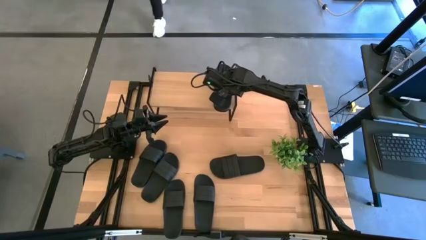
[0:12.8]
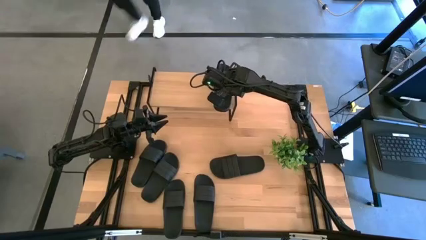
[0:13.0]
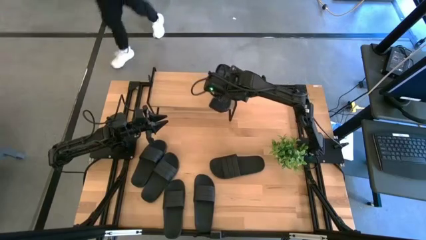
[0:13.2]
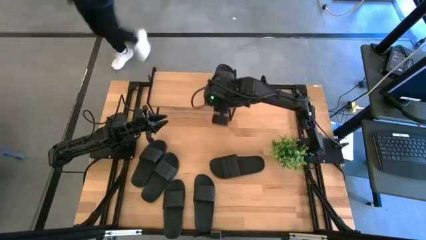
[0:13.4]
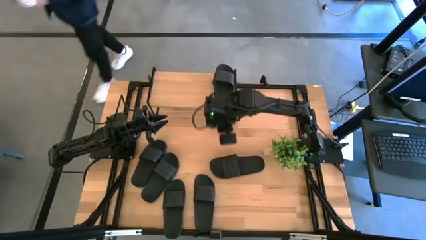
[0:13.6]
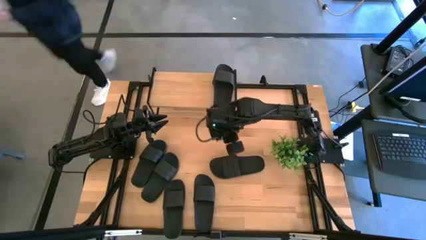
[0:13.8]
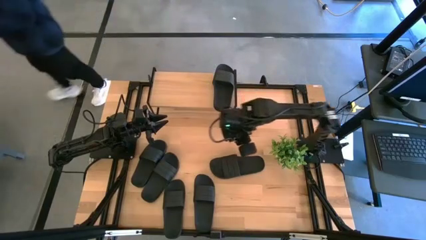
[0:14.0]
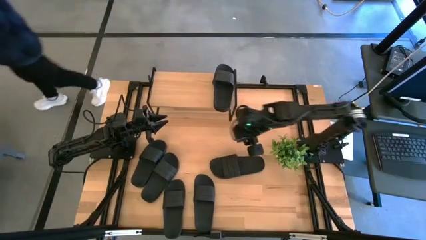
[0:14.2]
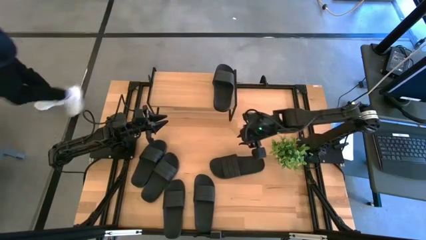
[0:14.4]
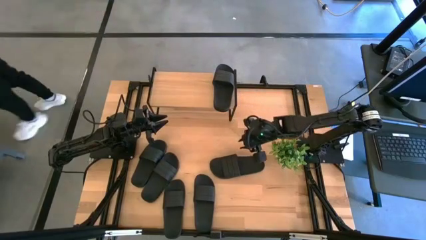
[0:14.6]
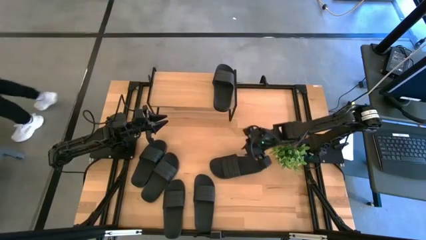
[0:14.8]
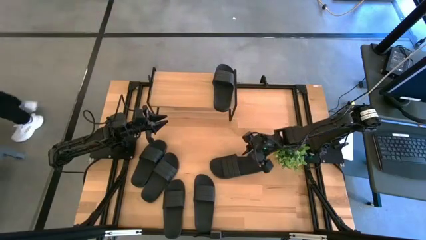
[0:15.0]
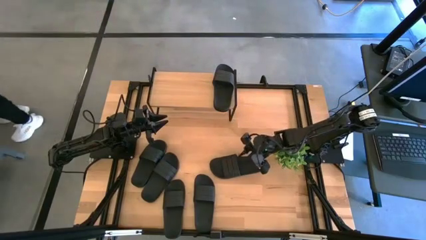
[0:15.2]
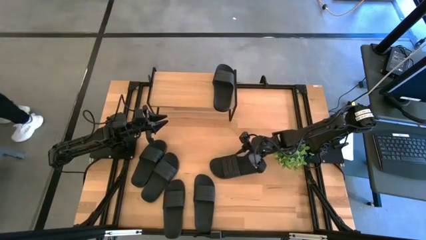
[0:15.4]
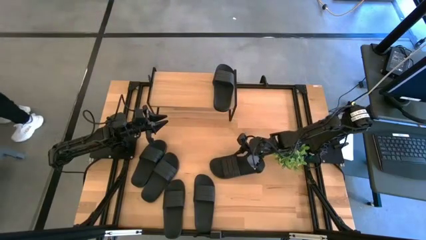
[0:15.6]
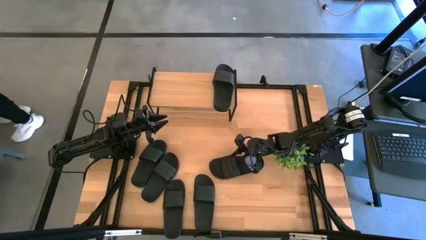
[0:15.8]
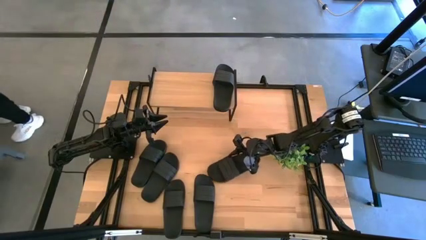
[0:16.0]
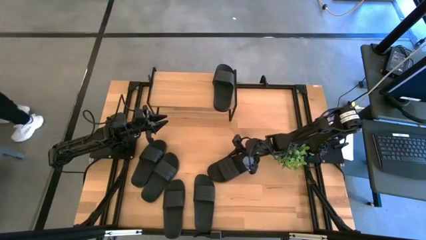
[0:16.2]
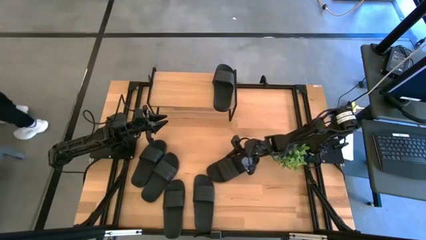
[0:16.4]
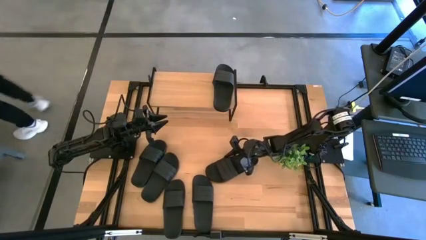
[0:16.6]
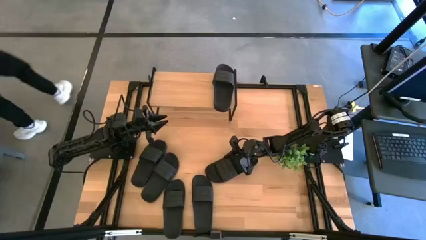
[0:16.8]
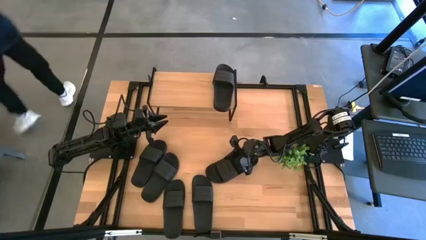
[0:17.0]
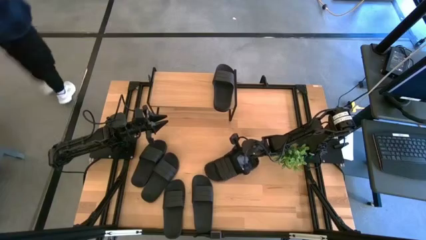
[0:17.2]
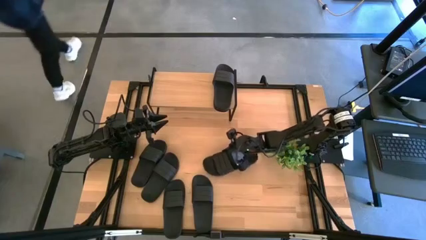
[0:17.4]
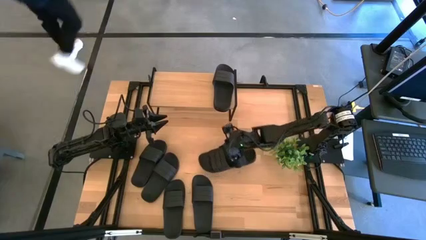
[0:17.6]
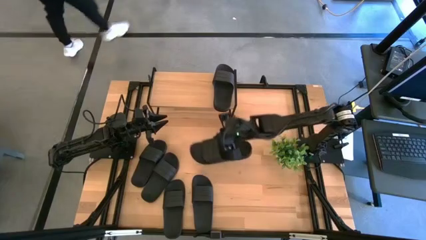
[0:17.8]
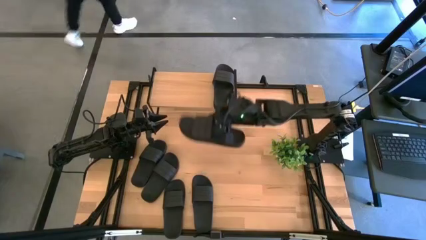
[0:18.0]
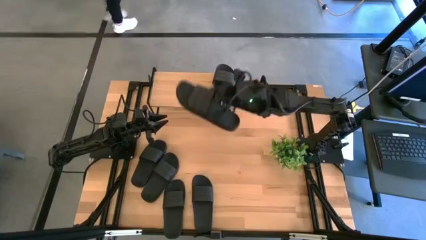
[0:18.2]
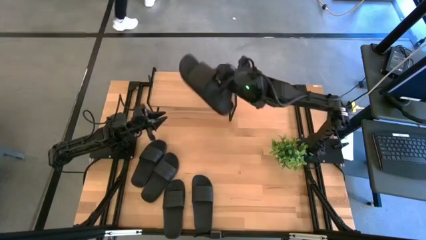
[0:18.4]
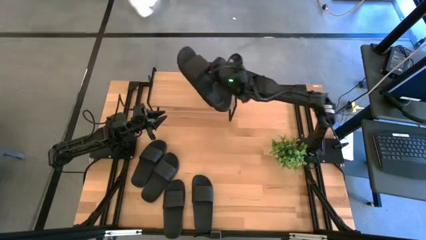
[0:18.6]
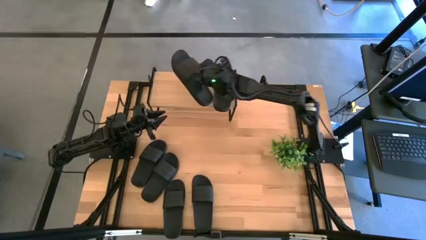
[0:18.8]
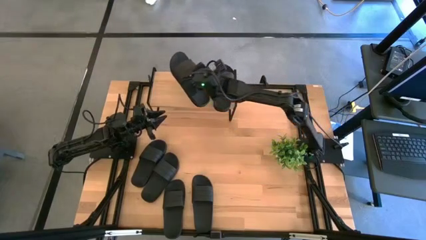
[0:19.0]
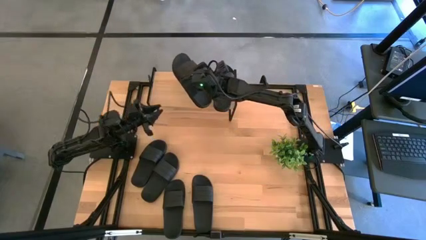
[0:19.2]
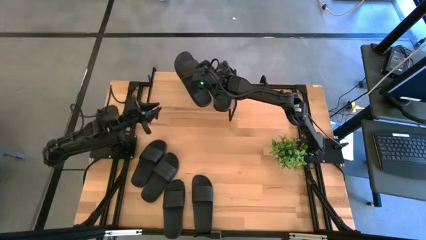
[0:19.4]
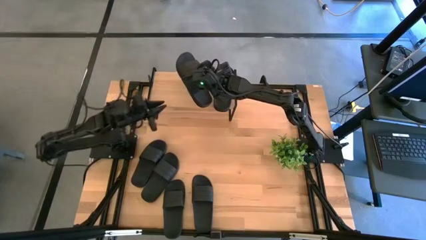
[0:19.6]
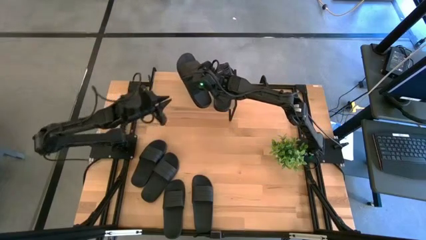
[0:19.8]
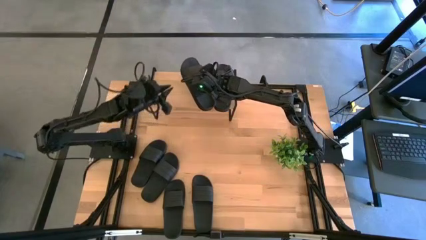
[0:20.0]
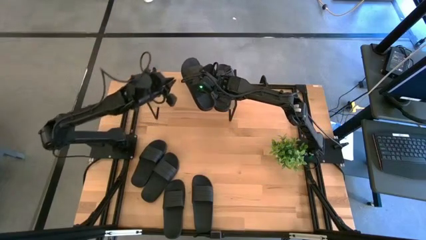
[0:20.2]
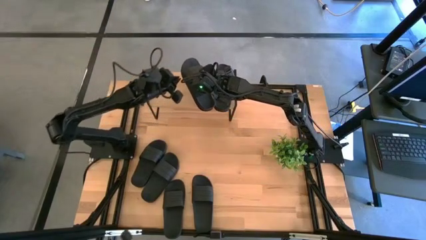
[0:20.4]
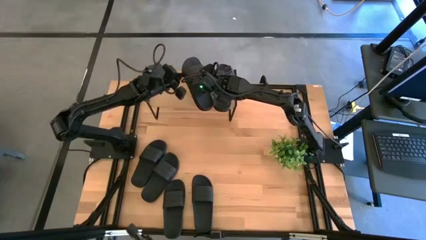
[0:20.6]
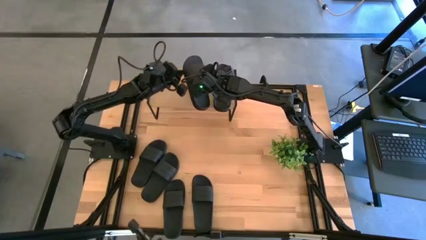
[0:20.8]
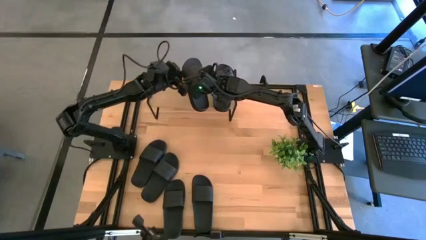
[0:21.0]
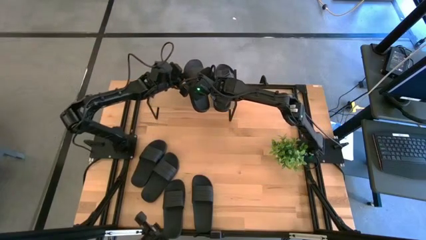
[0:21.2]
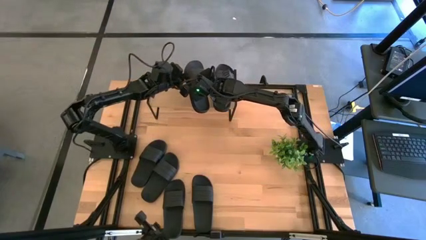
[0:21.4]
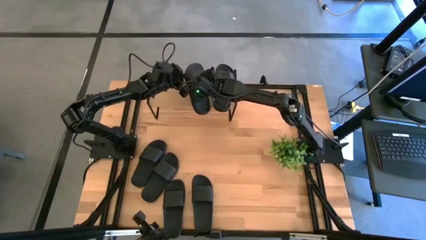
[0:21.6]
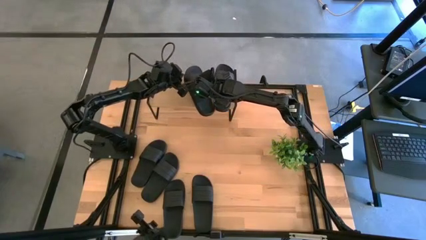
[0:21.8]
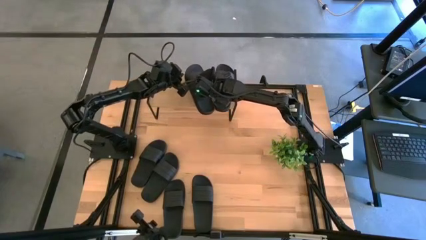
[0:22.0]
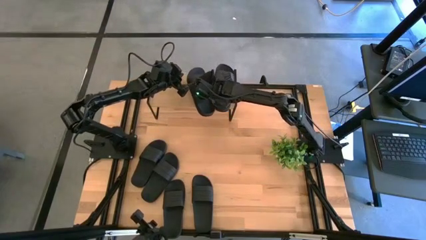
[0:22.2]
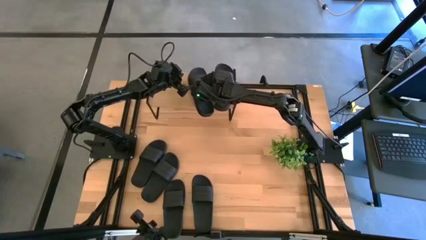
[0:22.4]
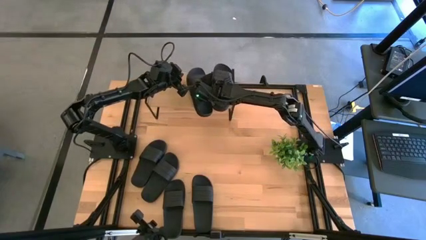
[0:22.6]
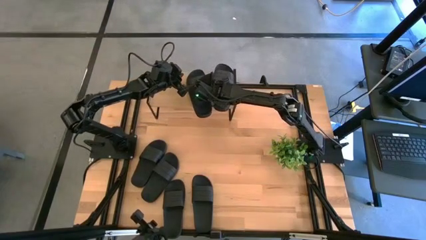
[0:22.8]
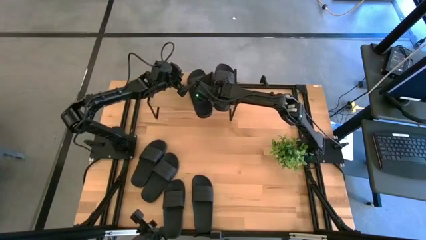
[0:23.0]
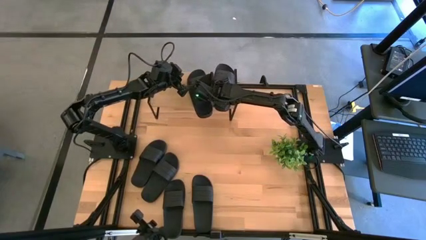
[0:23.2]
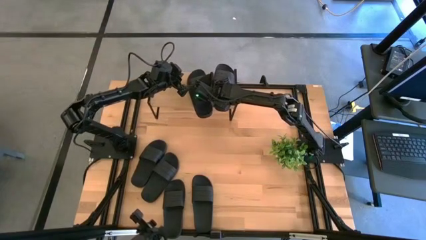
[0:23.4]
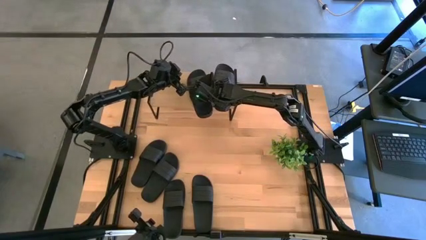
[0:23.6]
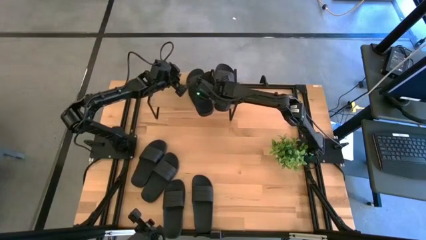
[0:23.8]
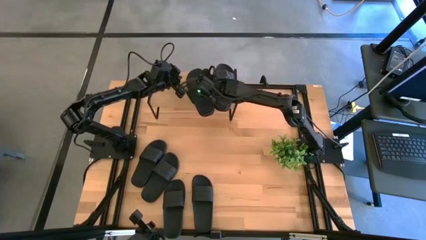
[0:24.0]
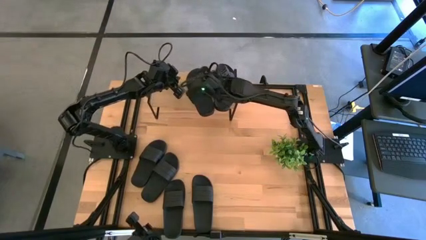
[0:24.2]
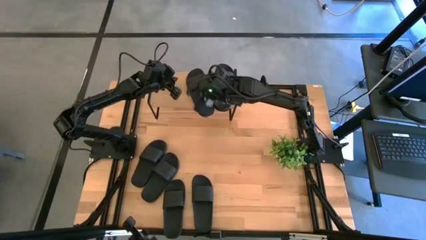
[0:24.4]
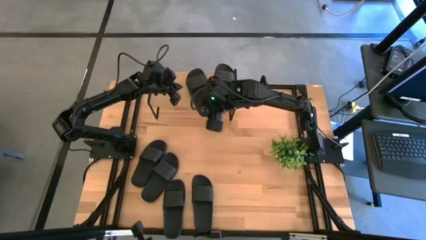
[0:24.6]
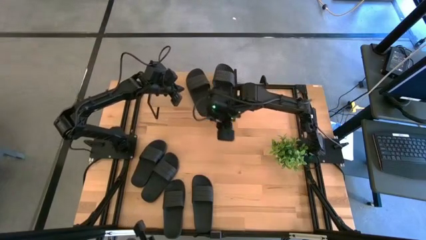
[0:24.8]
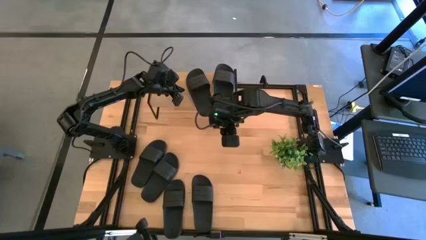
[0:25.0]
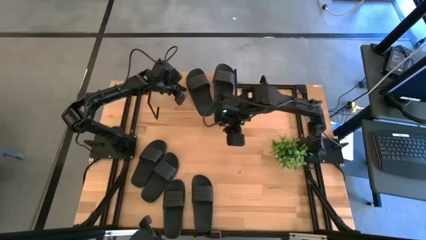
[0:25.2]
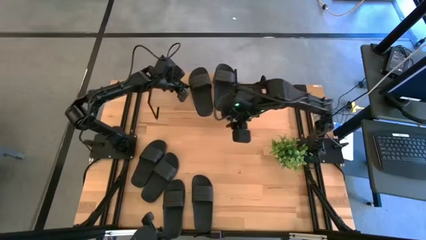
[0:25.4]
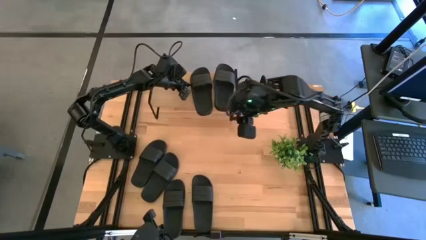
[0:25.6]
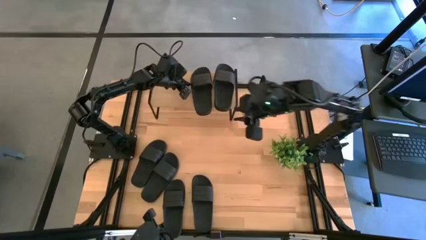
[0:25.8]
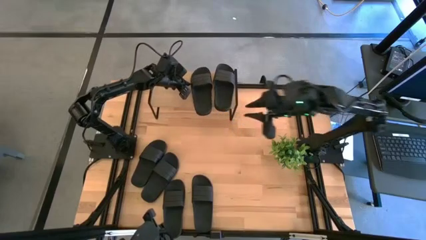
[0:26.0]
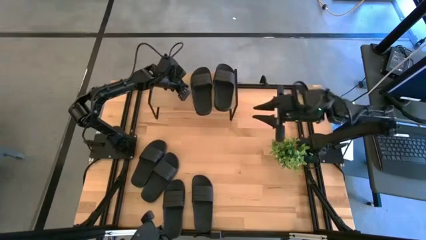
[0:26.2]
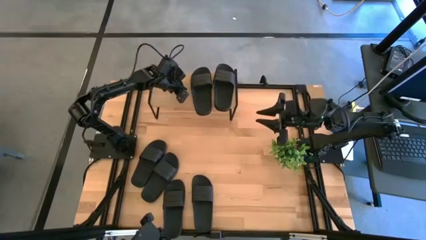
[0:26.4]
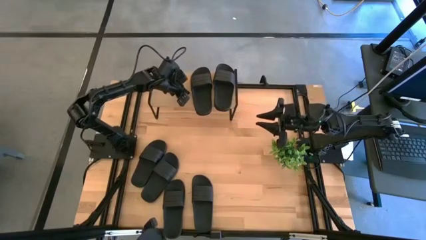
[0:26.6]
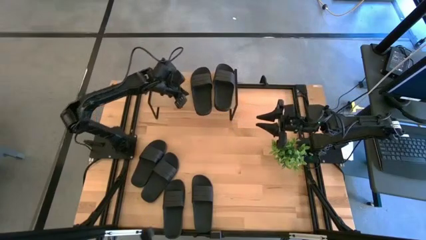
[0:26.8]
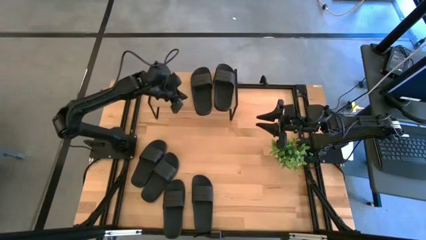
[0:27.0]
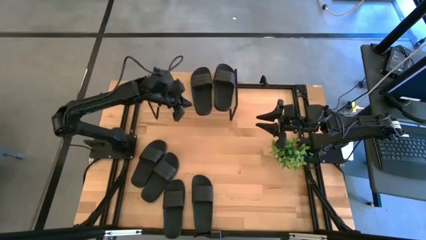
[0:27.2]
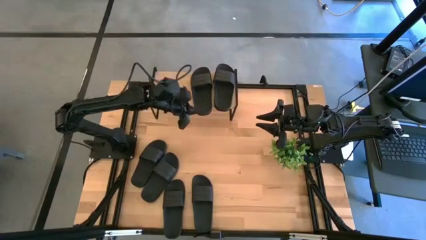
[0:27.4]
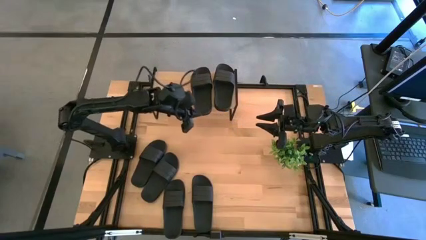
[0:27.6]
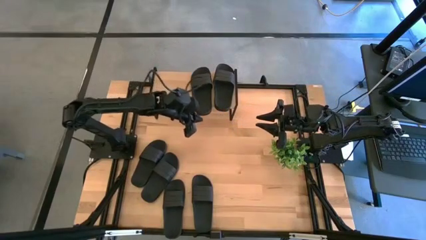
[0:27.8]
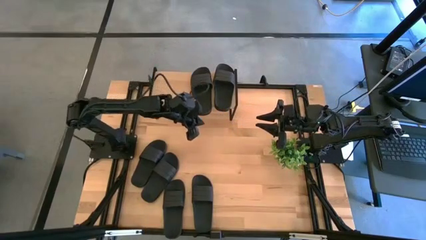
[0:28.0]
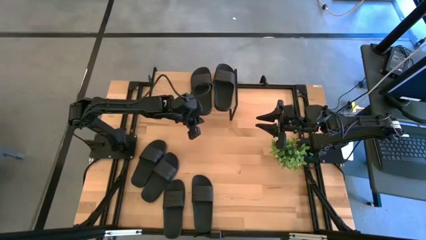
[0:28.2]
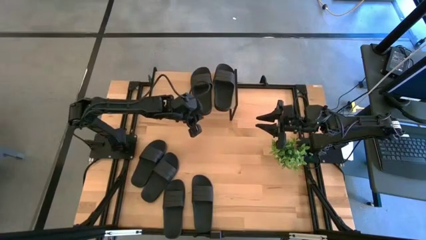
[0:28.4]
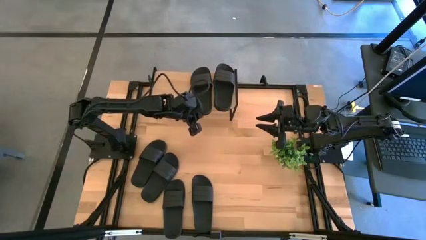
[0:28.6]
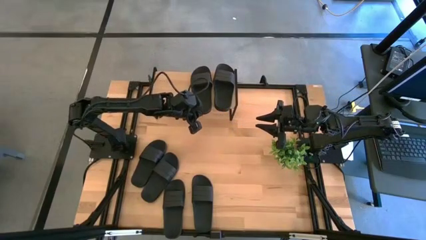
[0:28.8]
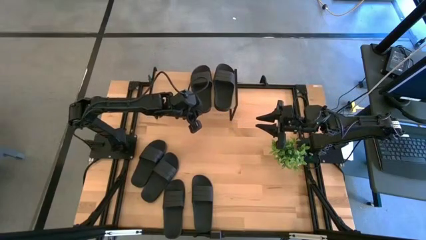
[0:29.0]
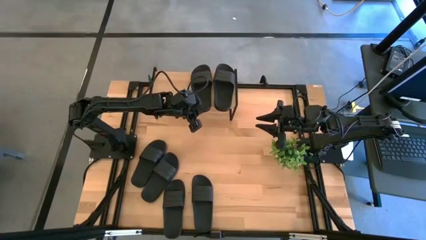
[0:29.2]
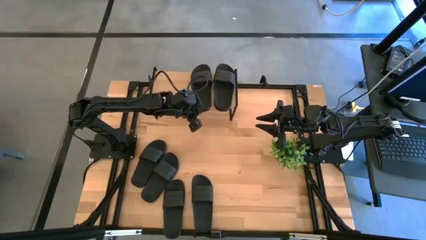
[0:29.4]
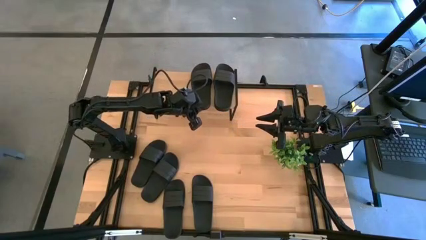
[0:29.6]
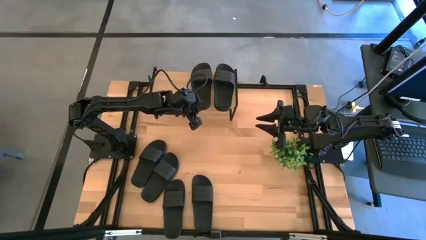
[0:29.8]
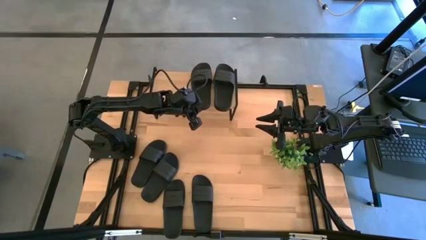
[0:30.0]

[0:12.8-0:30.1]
Task: Pick and place slides into the shelf
Put the black slipper on the shelf
